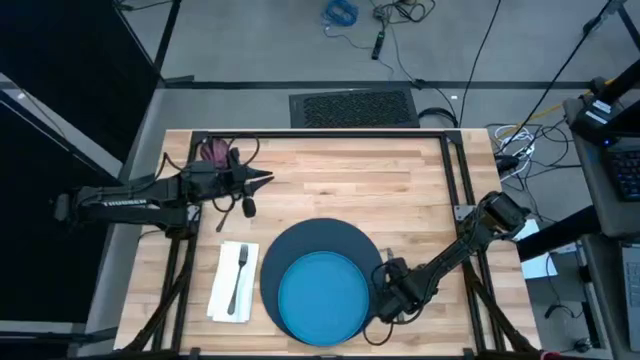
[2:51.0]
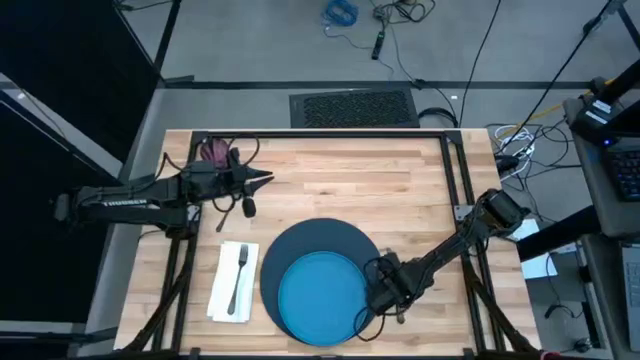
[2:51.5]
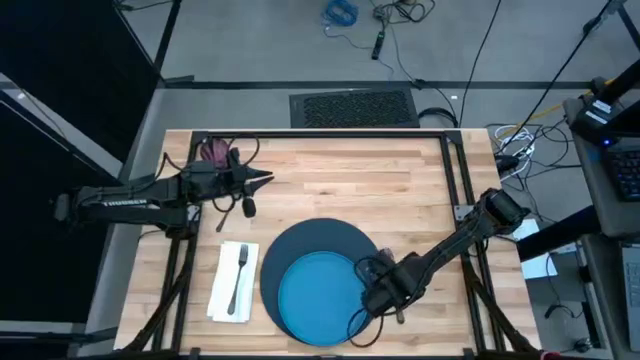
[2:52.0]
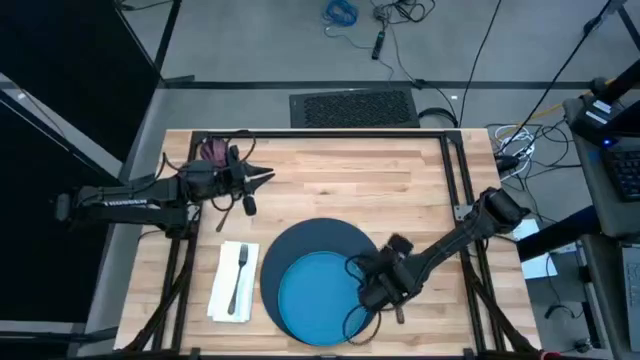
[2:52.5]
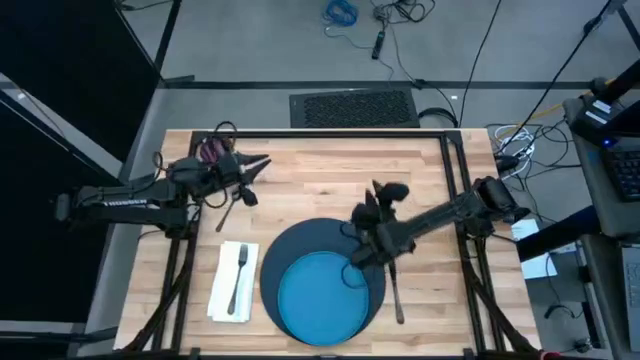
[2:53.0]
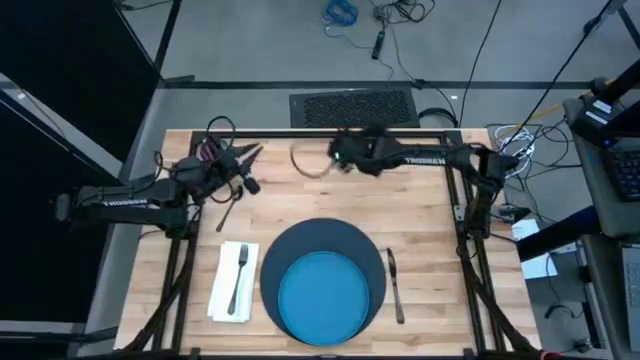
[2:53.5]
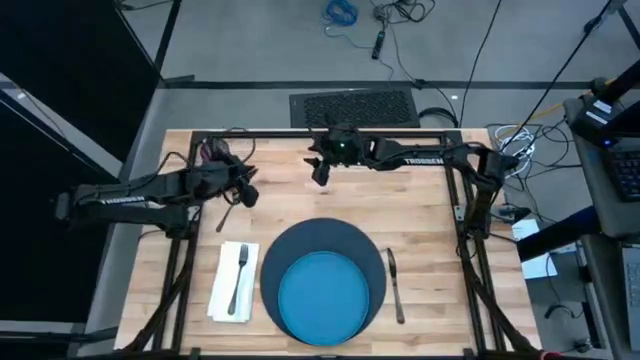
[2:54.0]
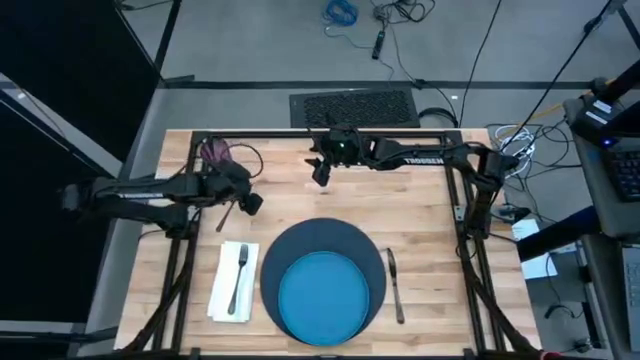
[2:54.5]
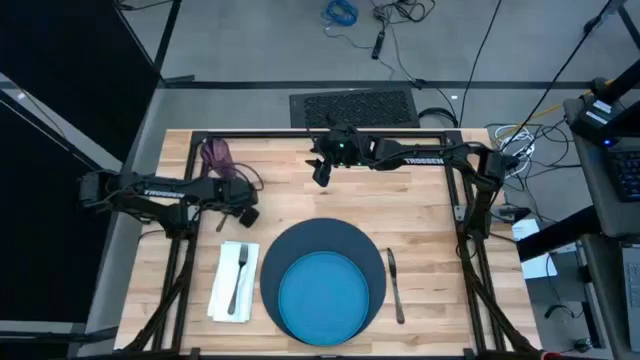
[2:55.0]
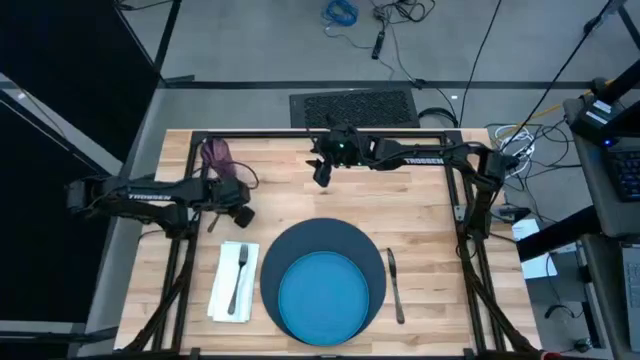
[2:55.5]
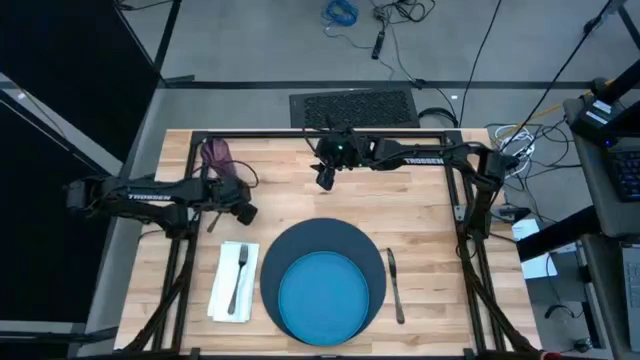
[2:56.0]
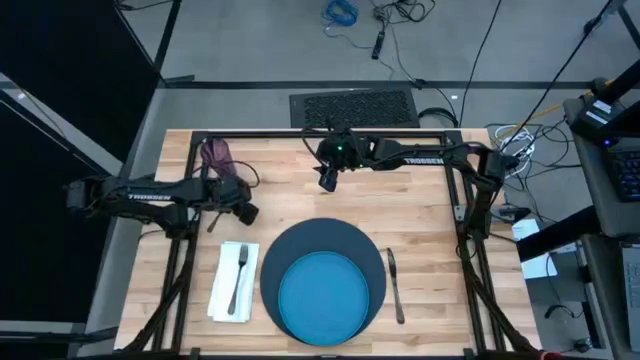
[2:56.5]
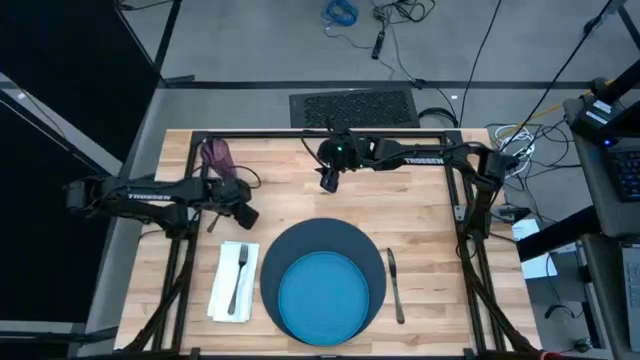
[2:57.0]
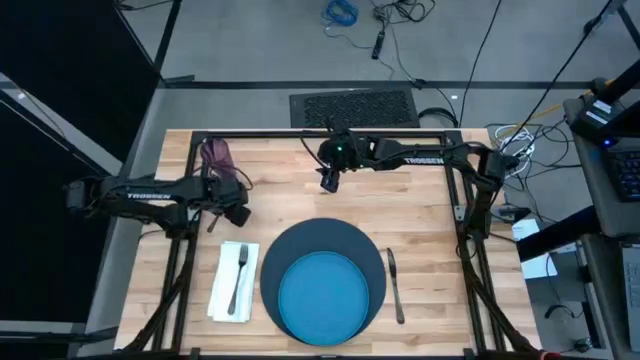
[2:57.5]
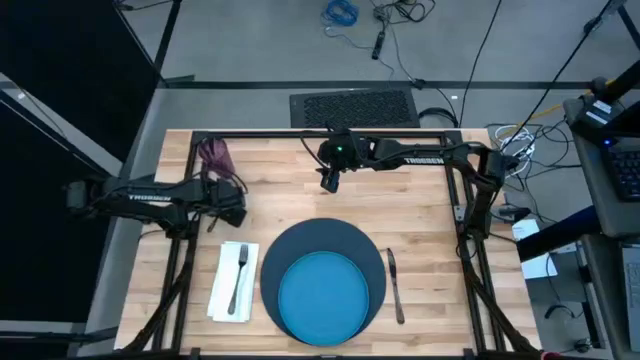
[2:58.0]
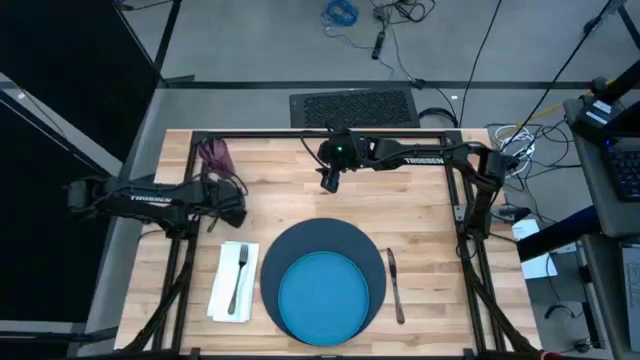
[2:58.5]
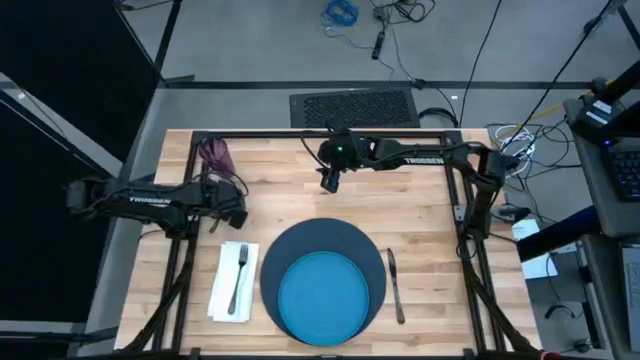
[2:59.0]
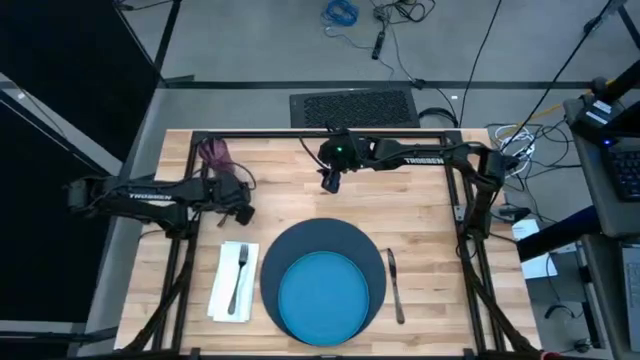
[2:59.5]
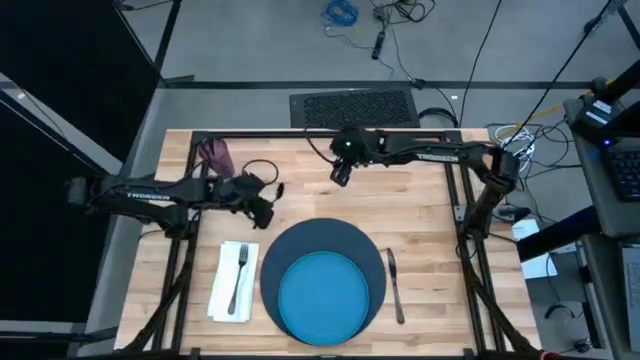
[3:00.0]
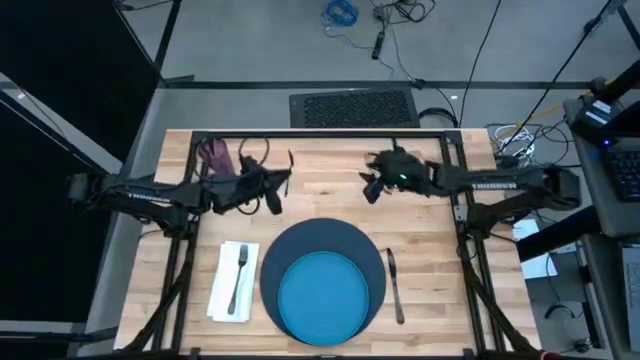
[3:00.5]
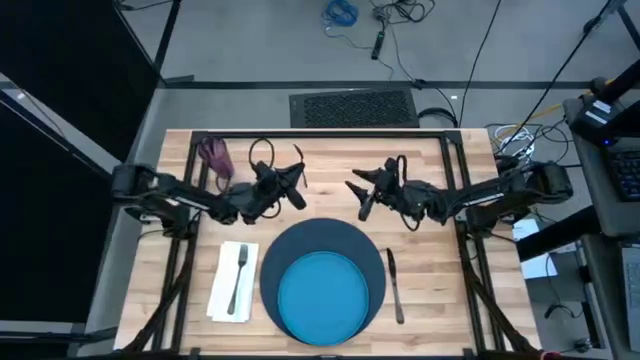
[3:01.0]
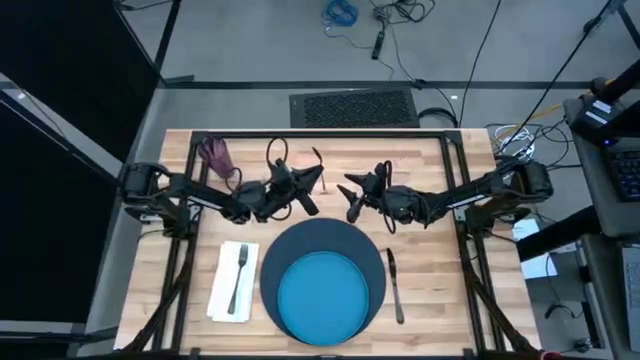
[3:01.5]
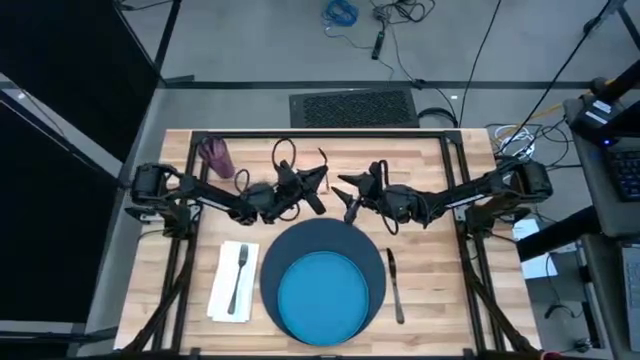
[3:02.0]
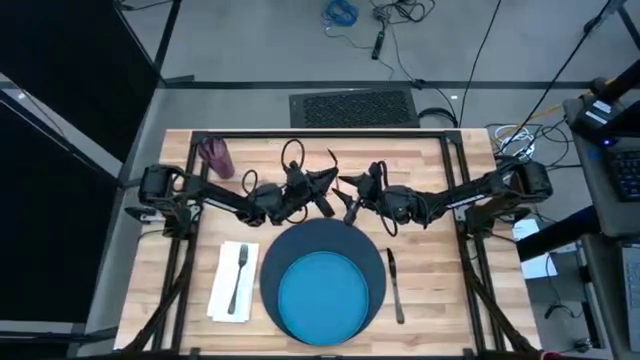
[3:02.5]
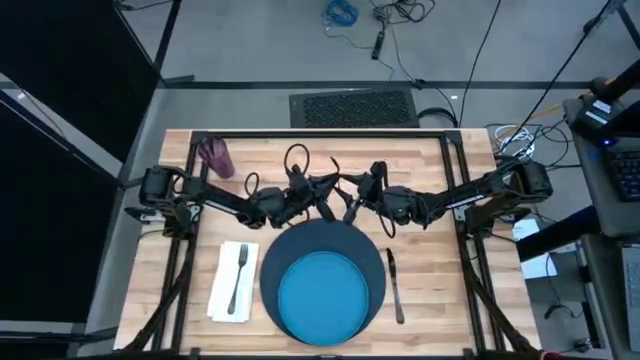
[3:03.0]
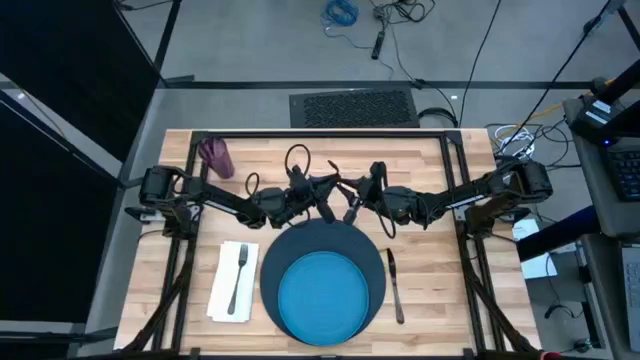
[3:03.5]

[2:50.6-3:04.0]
Task: Set table place
Put the spoon on the right side of the table knife

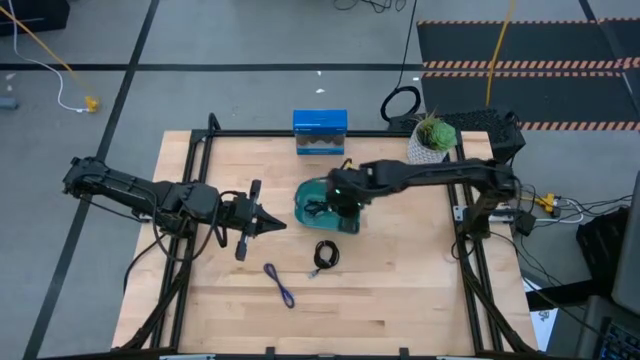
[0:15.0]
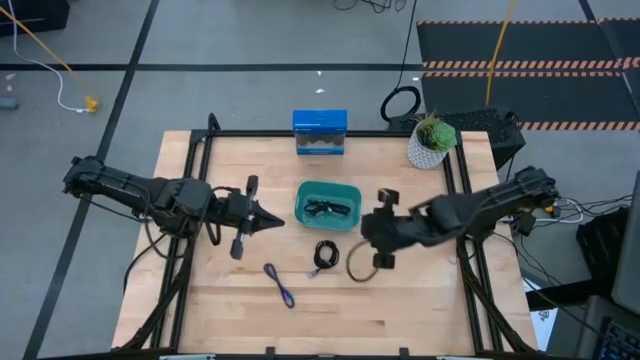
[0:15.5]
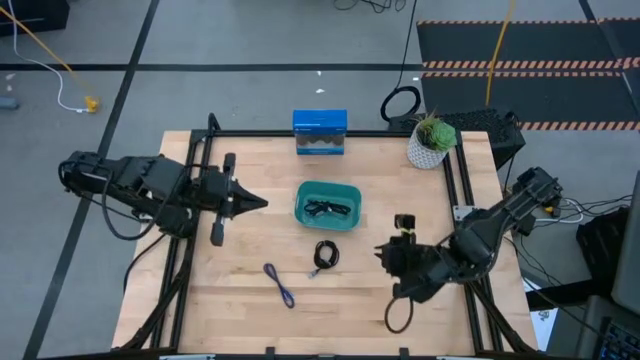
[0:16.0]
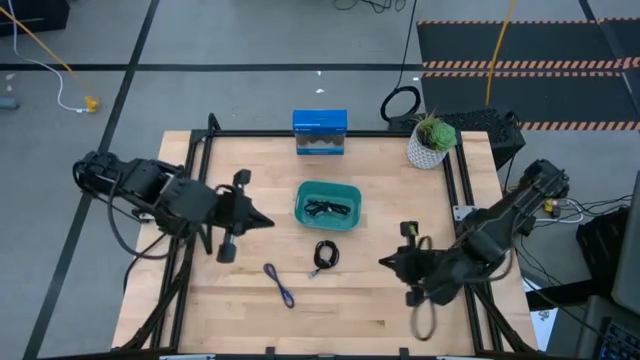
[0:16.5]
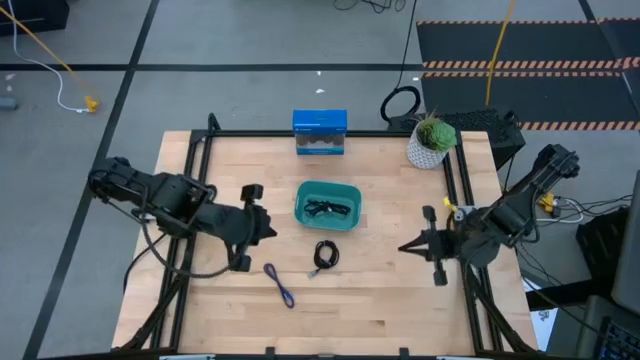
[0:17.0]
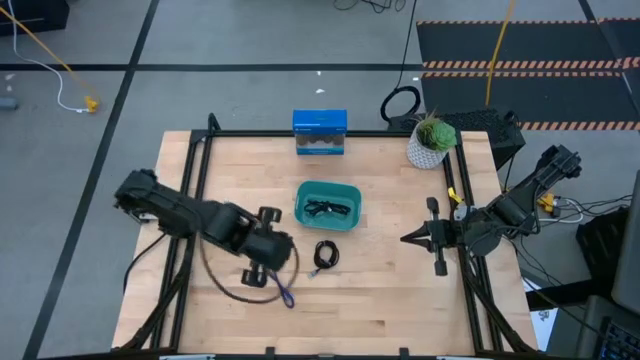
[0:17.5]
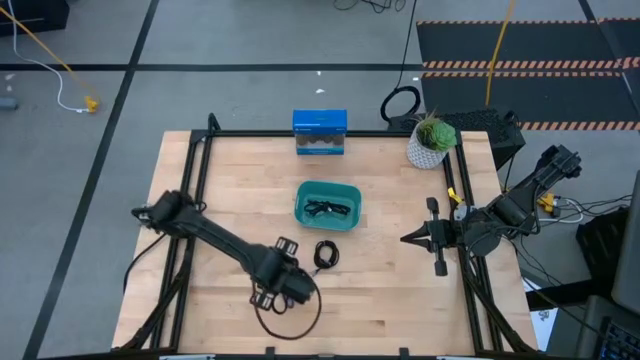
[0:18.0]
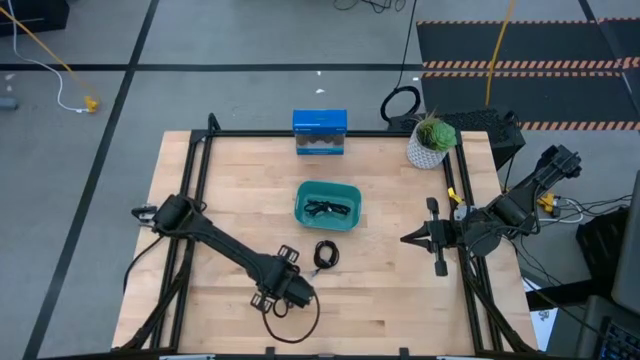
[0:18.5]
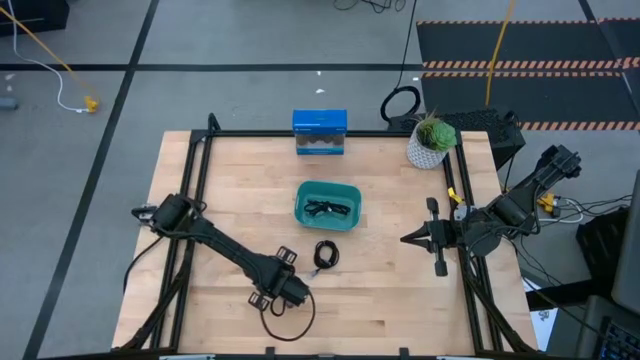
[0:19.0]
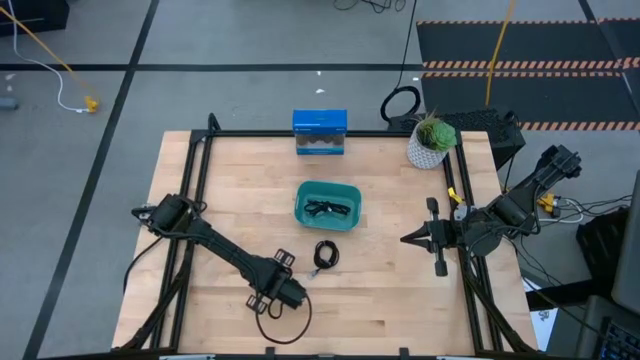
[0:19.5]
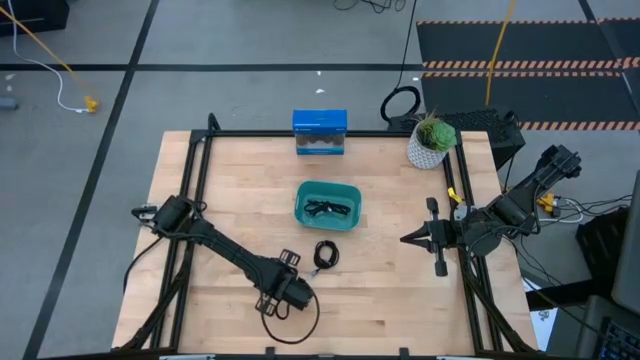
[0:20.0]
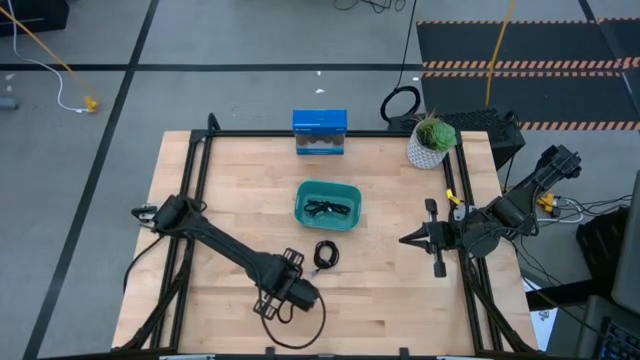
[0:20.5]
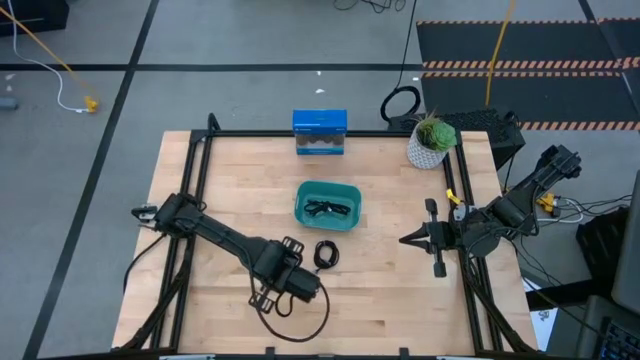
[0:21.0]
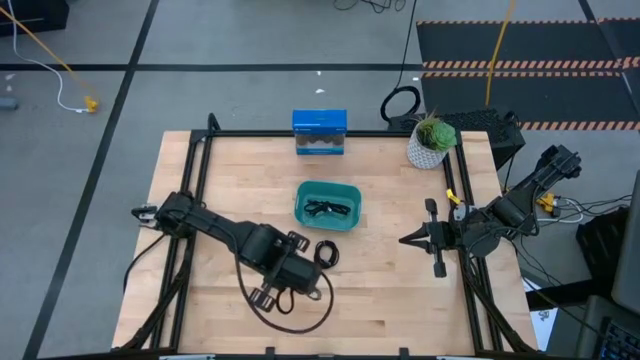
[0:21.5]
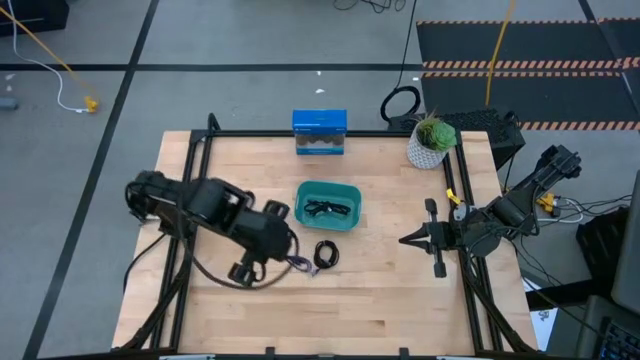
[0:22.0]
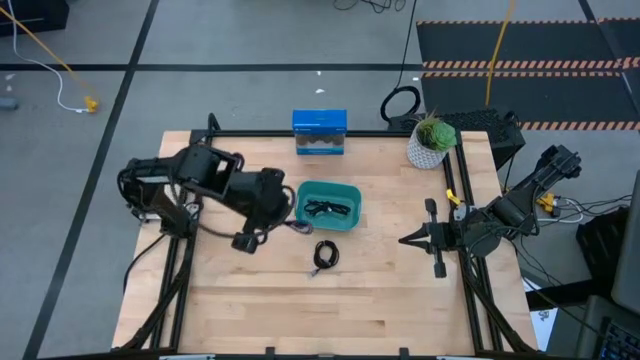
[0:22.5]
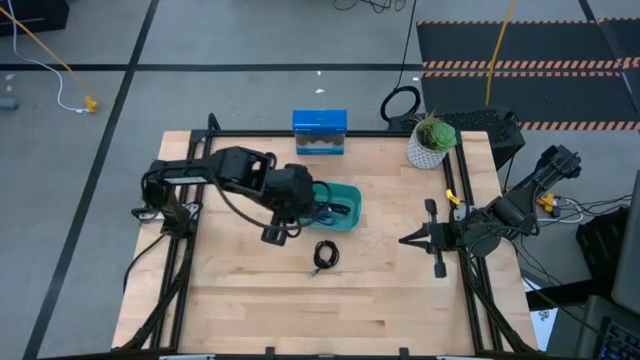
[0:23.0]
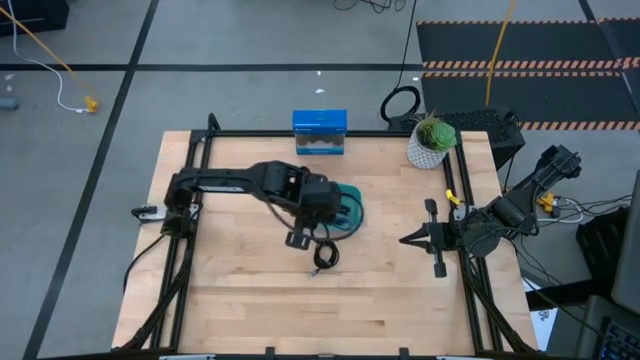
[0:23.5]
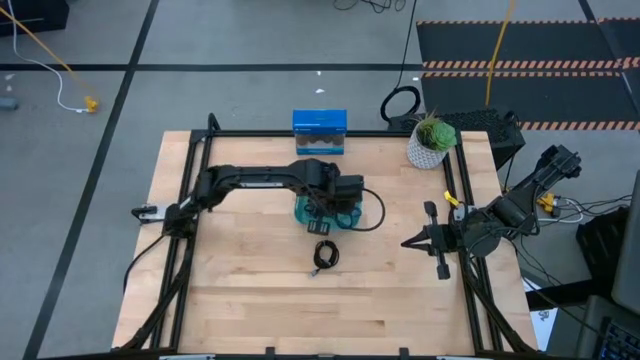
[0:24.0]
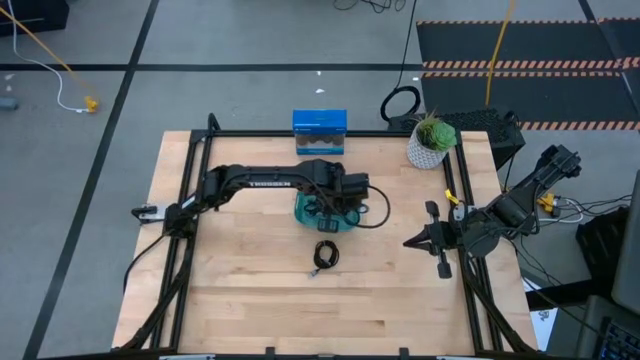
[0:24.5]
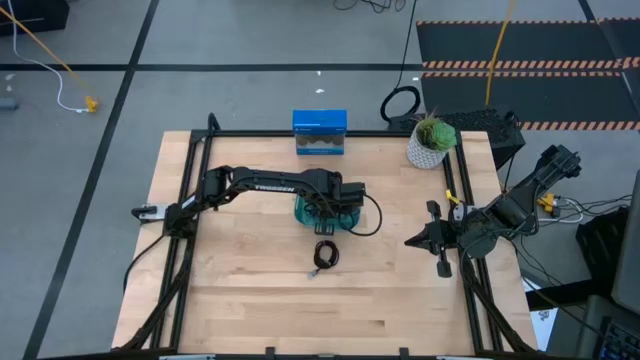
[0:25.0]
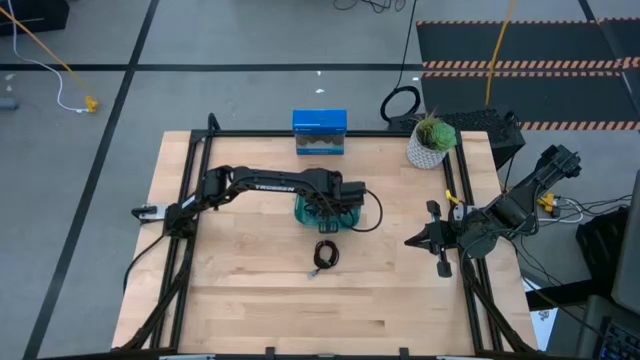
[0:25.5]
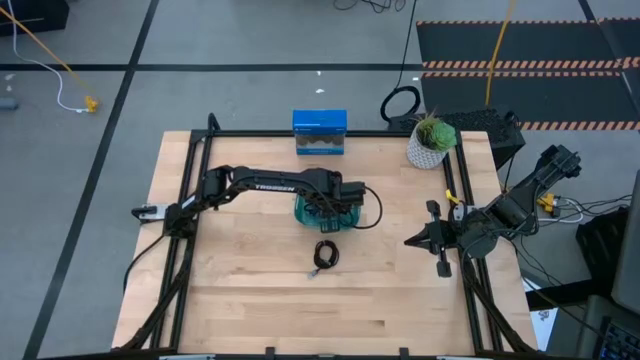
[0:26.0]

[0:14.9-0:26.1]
Task: Pick and place USB-C Cables
Put the violet charger cable into the green container
